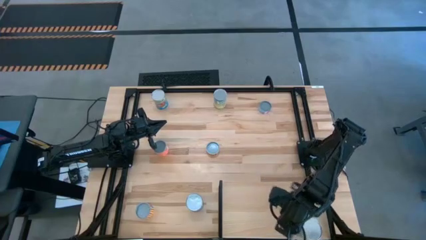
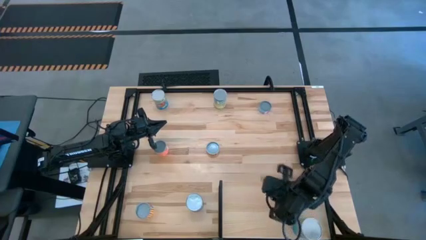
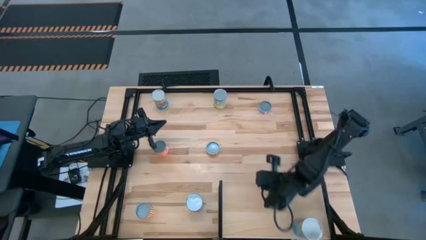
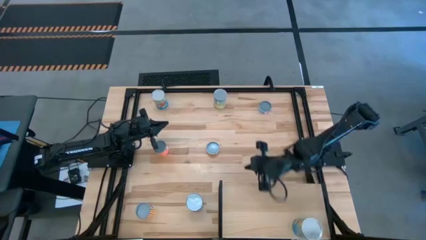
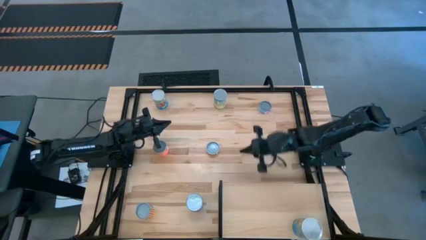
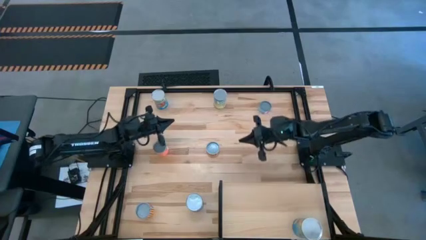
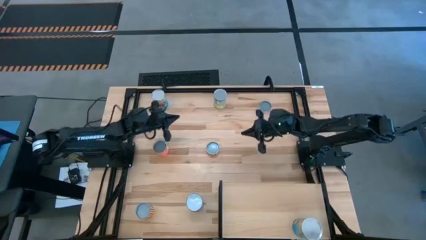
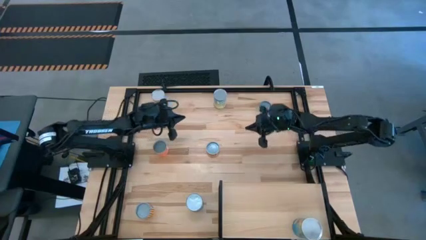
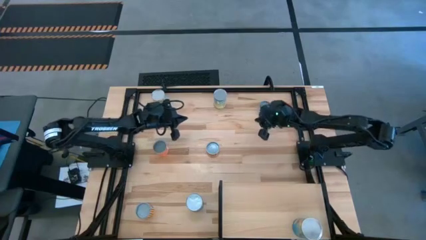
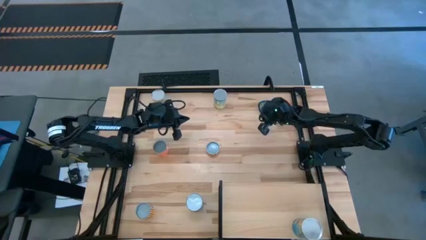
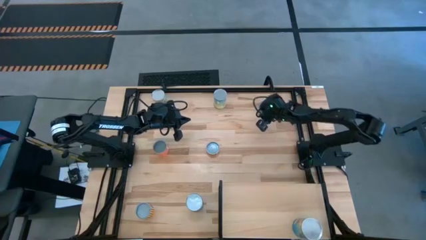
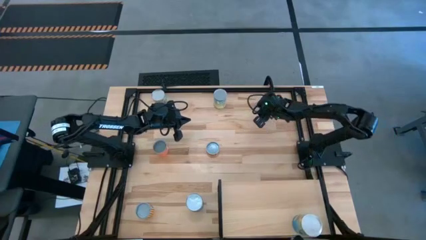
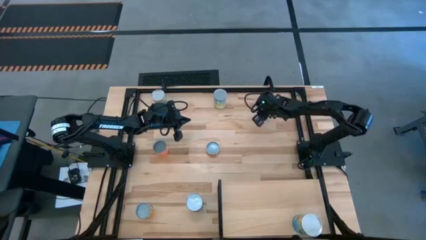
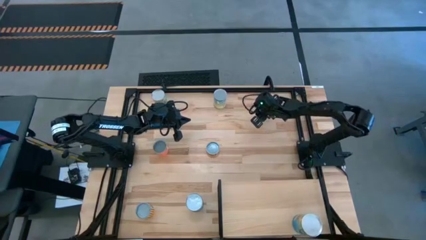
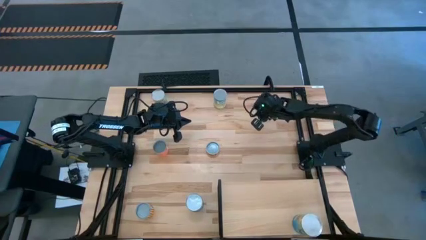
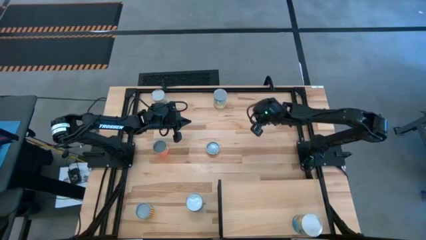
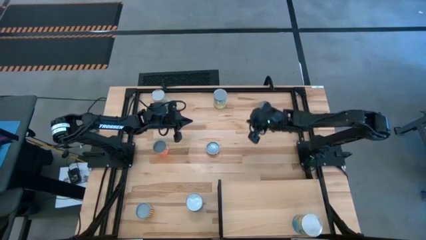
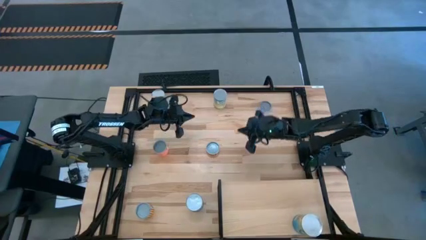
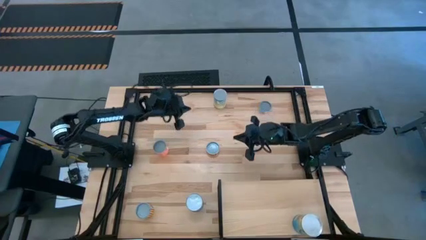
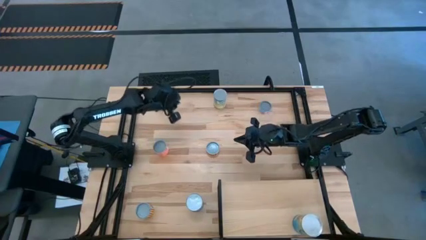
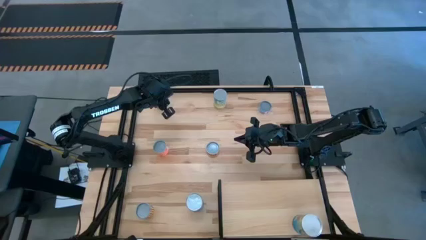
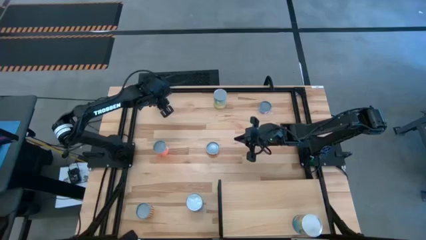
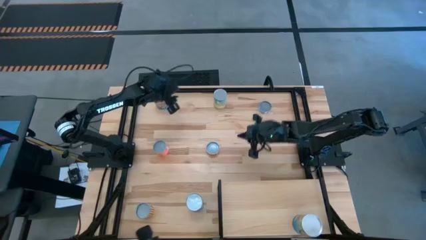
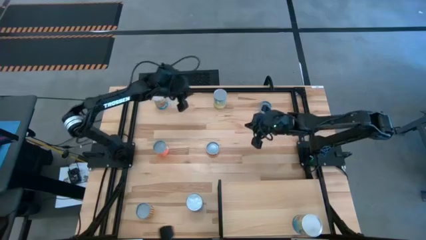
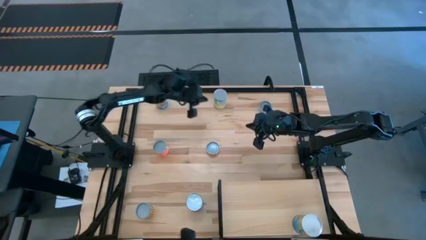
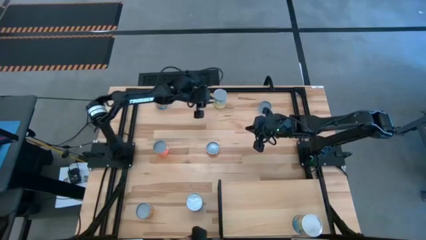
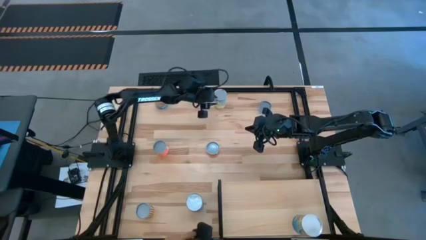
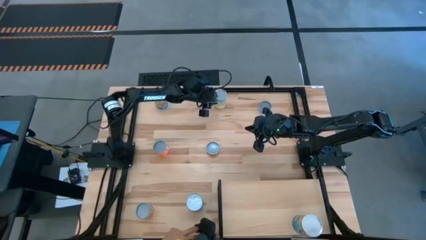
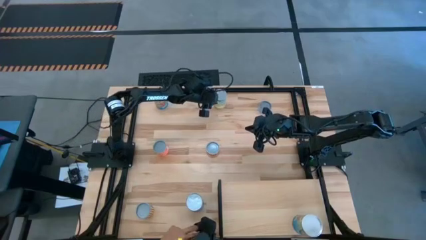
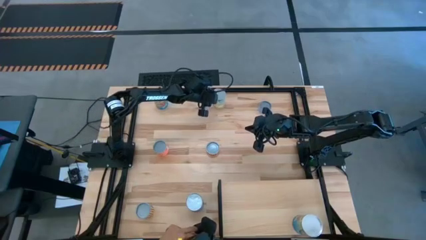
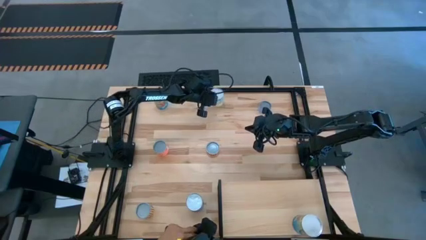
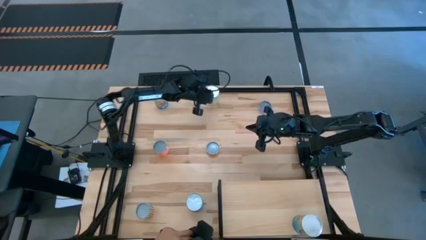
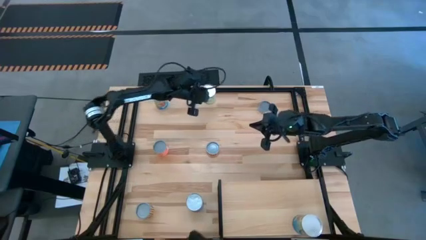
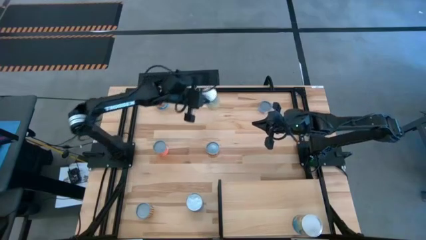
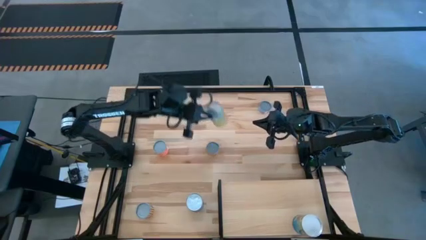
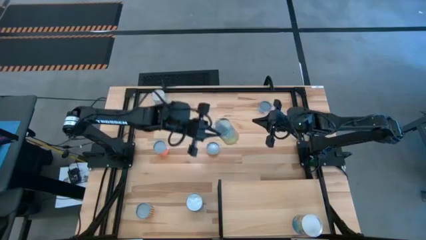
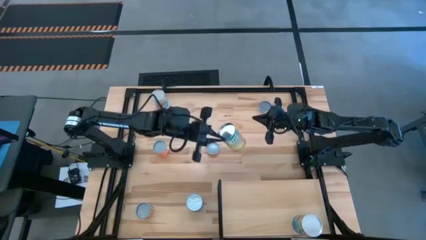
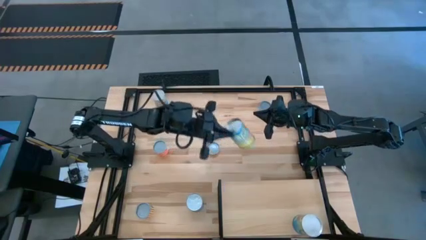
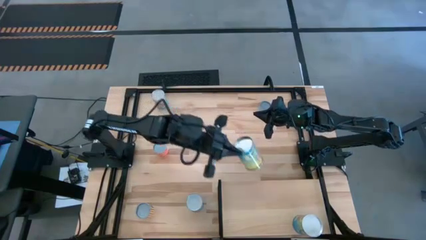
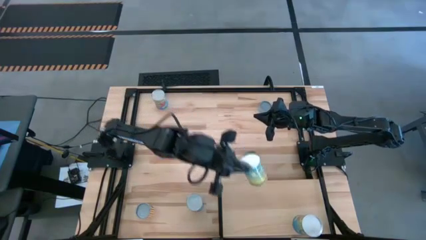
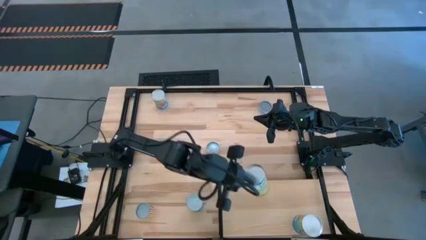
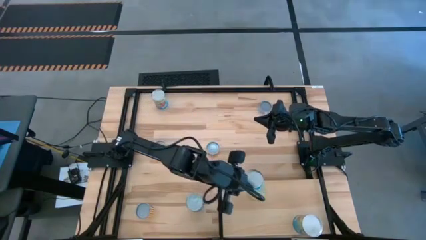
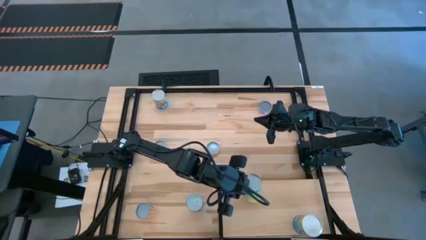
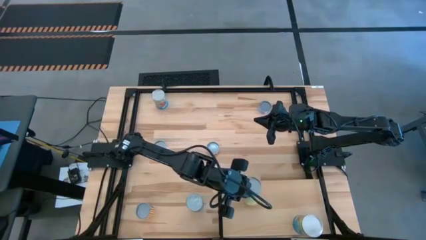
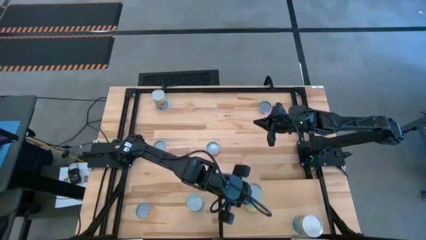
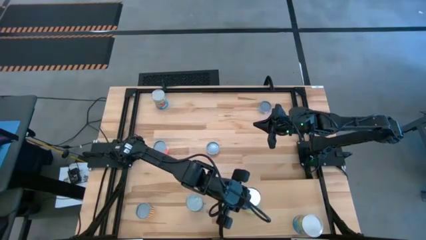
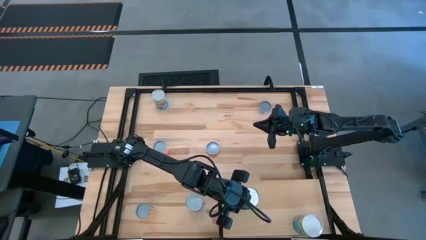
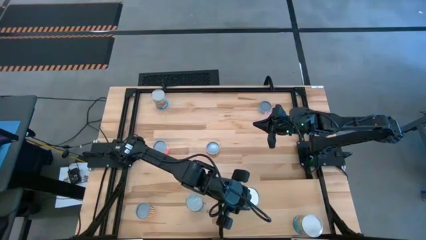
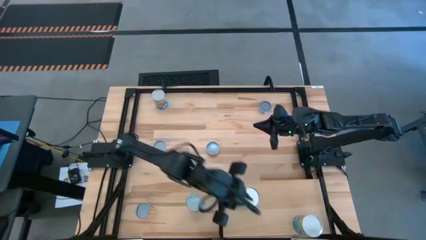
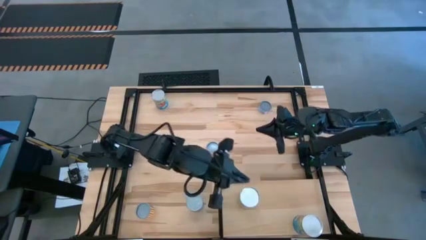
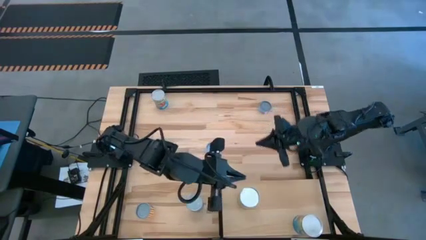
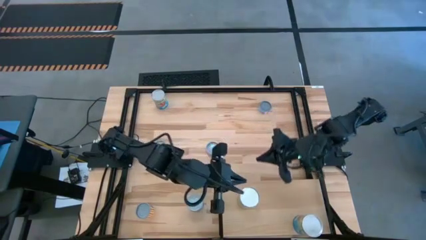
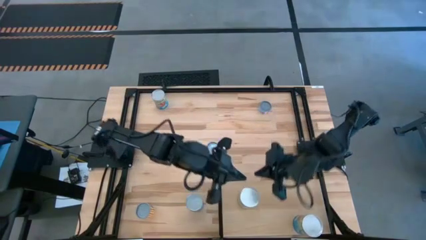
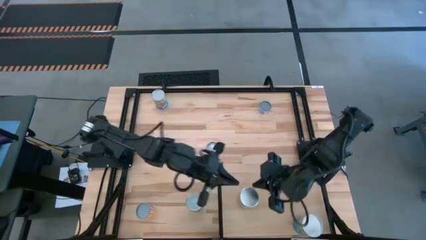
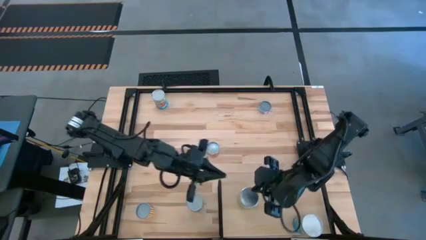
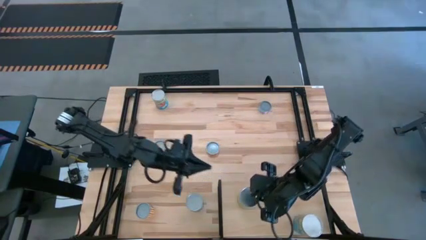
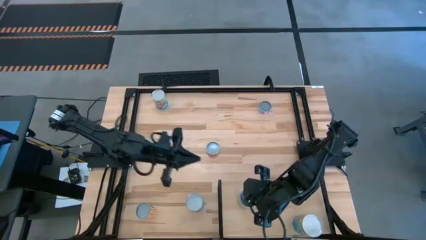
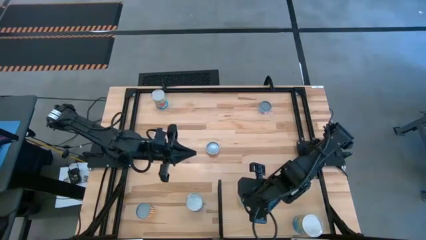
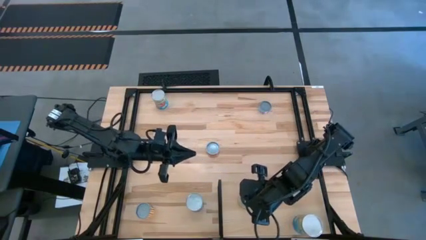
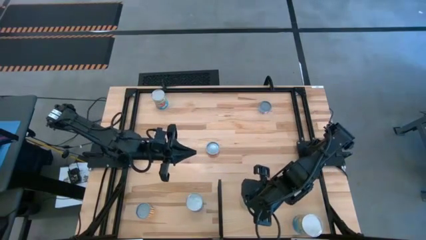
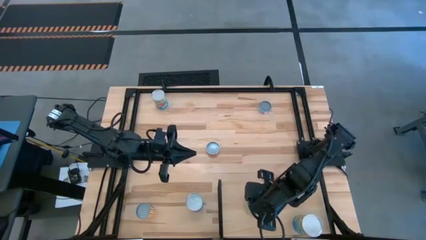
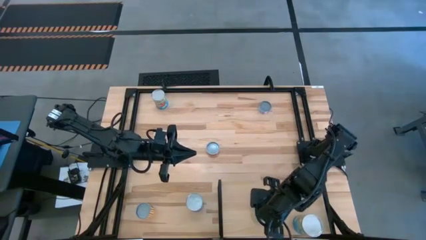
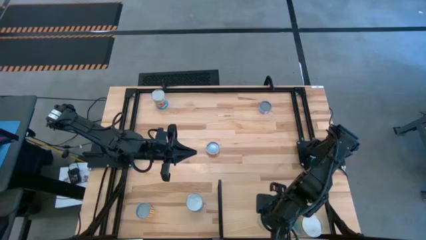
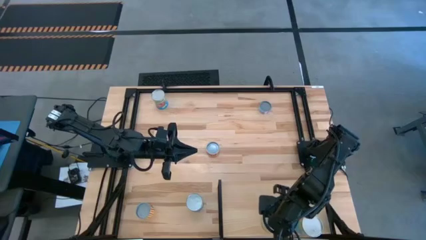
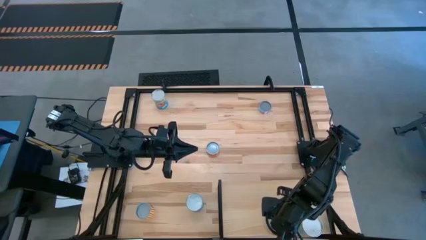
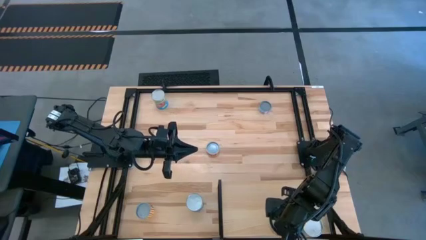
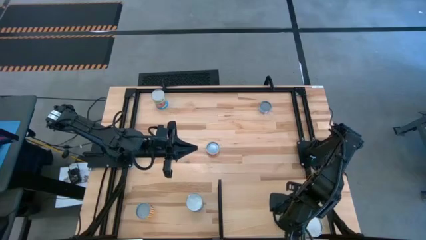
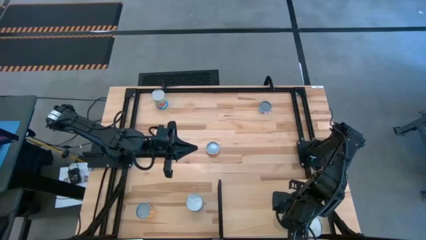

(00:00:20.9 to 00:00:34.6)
Task: Pick and place cans onto a shelf
Put the canned carrots on the shelf
